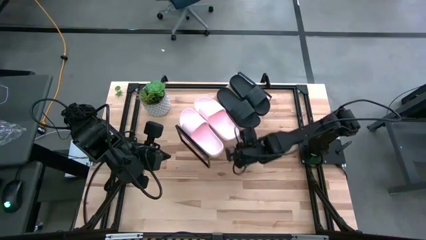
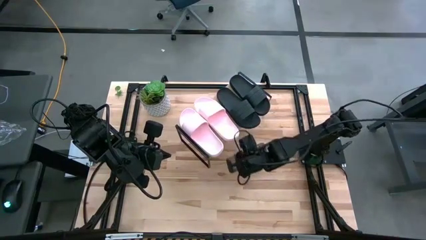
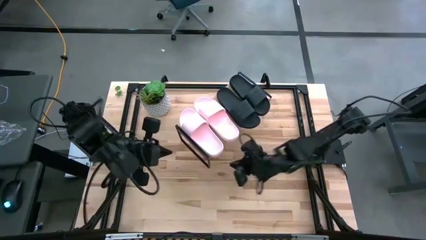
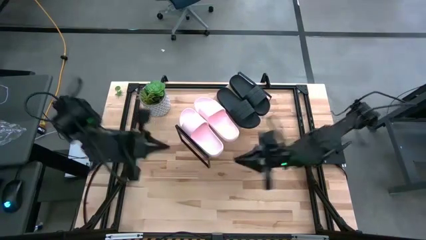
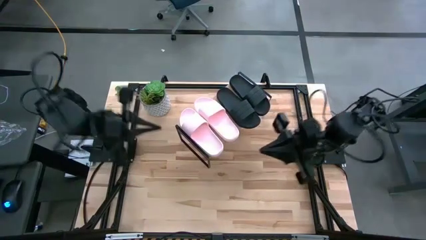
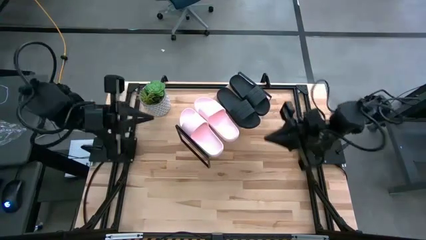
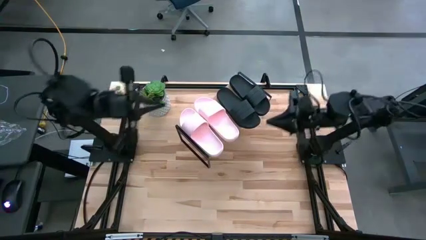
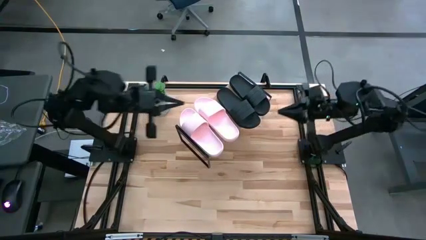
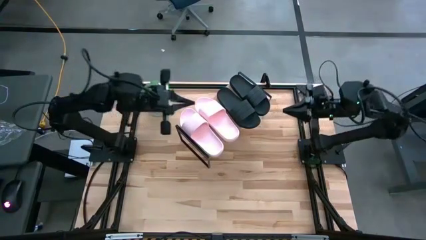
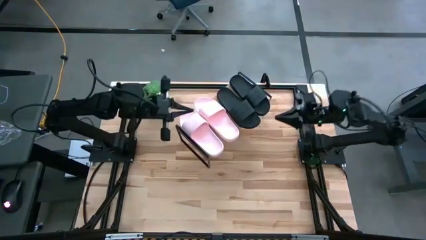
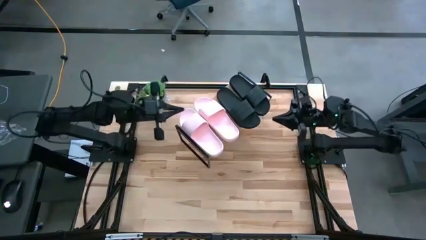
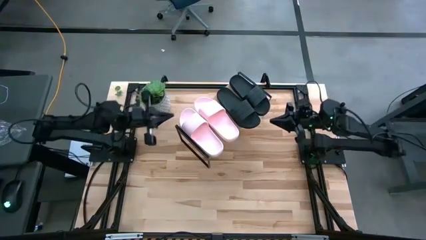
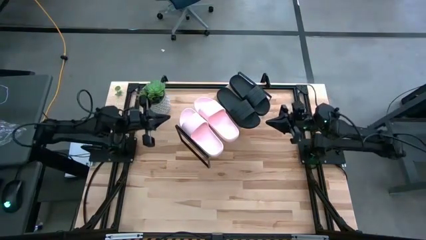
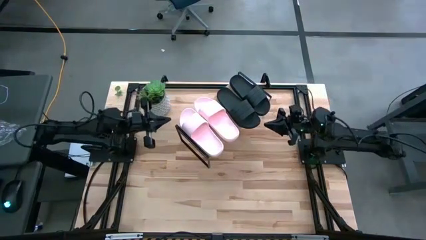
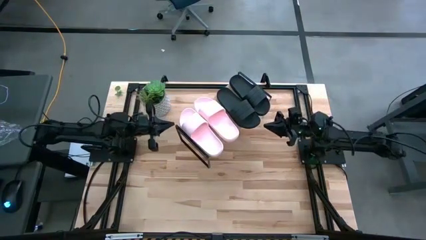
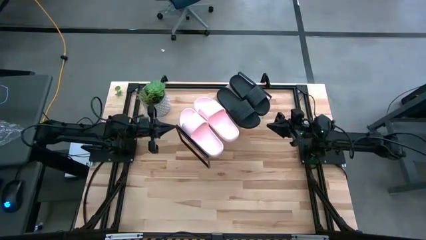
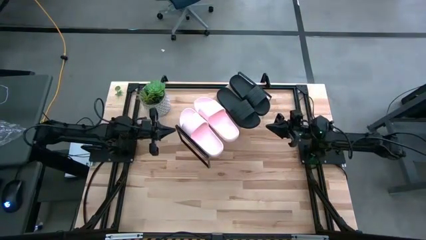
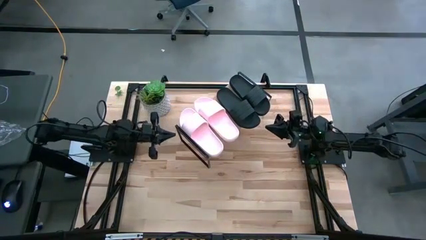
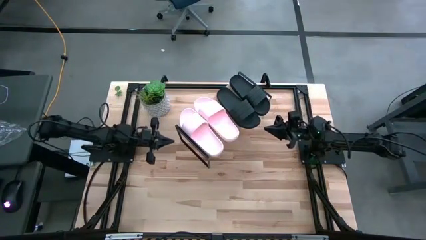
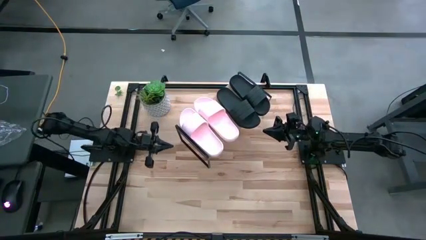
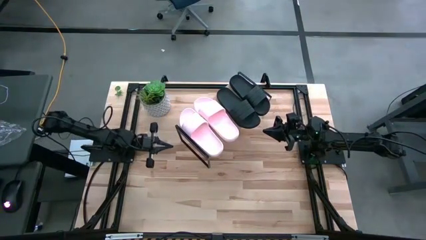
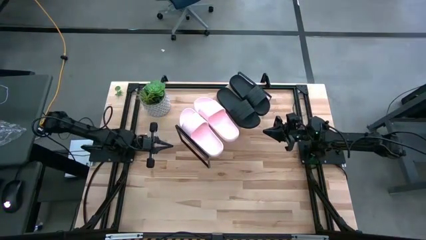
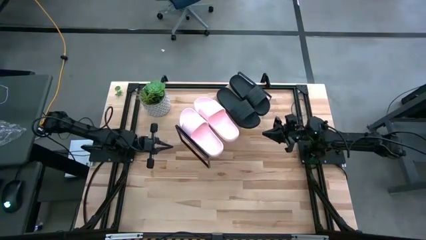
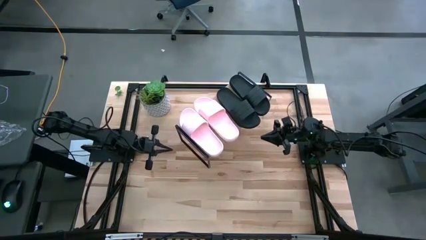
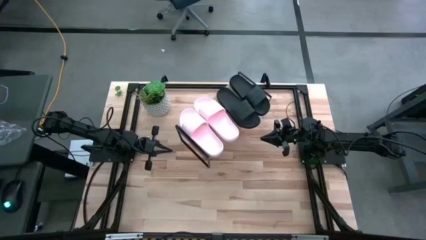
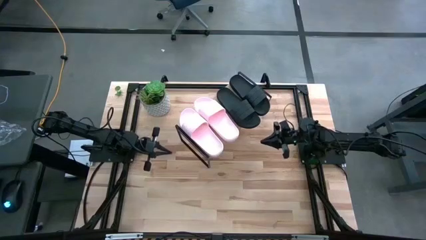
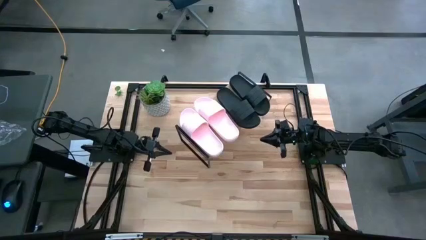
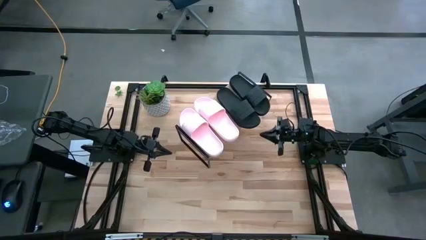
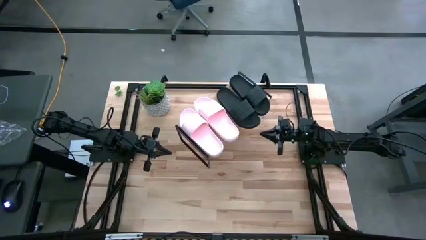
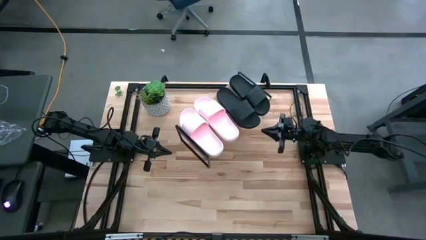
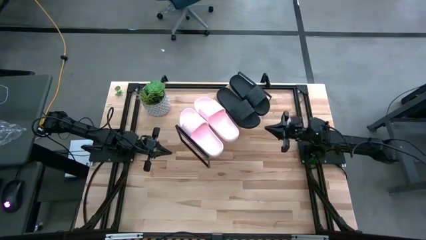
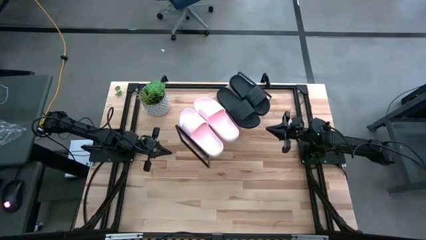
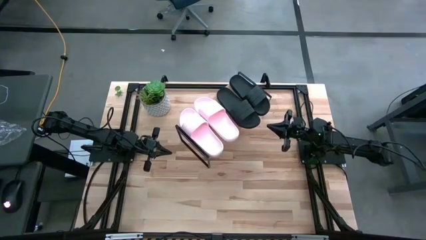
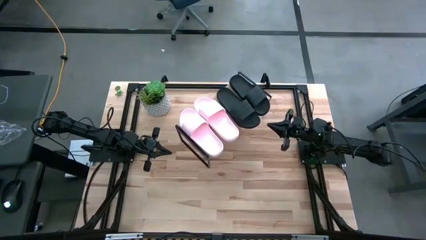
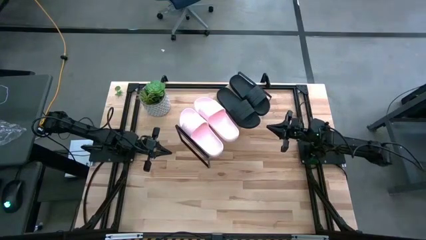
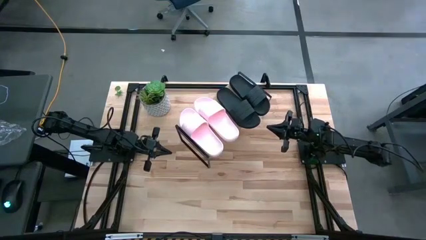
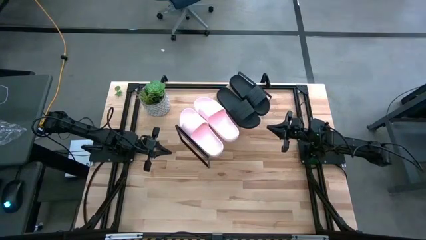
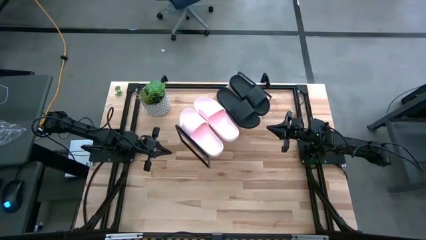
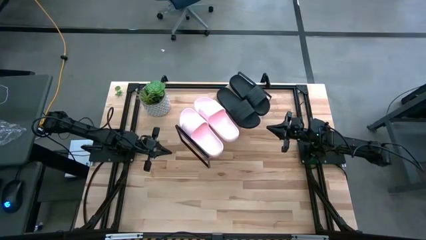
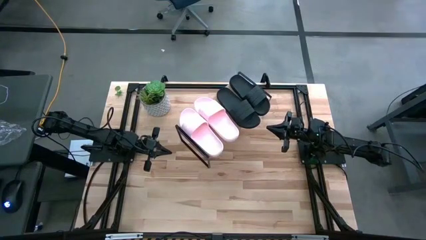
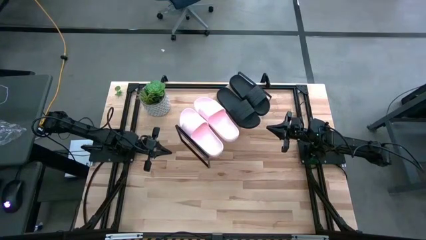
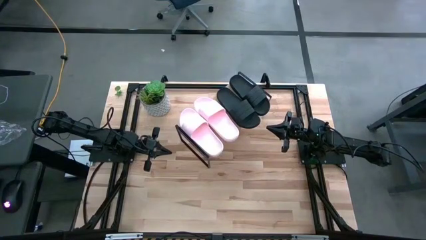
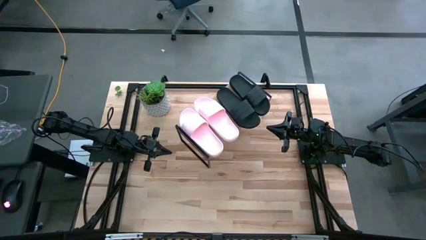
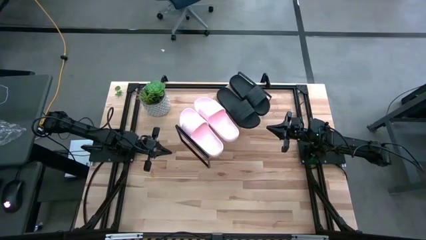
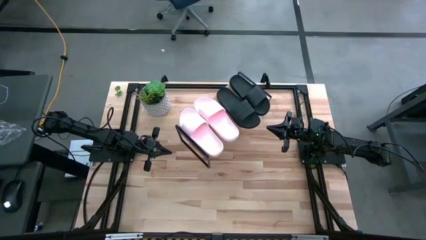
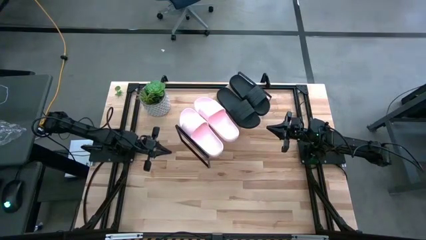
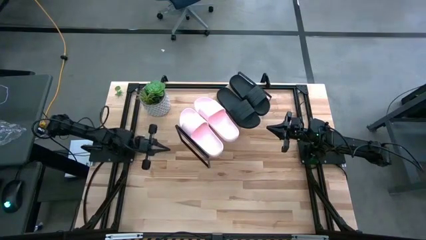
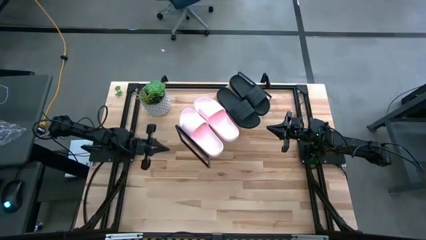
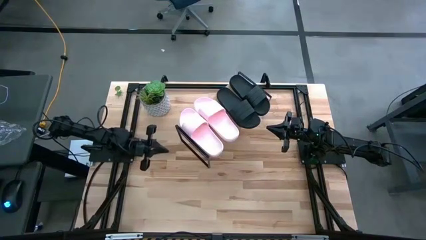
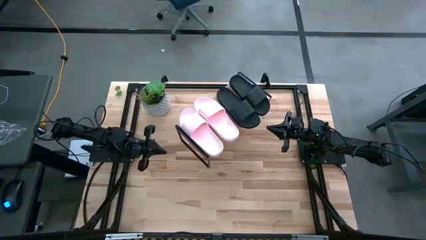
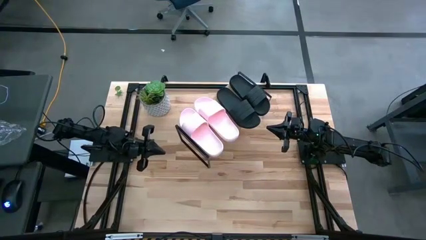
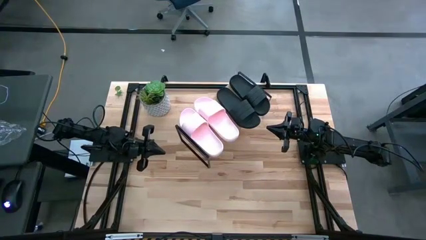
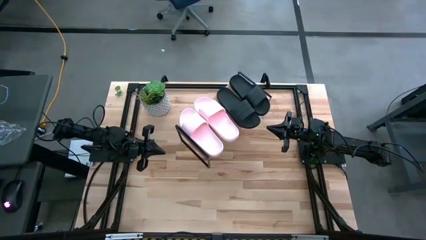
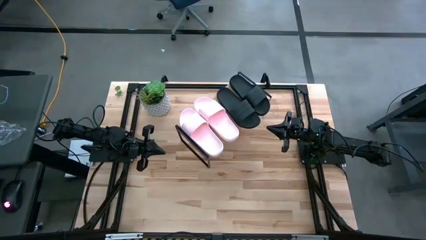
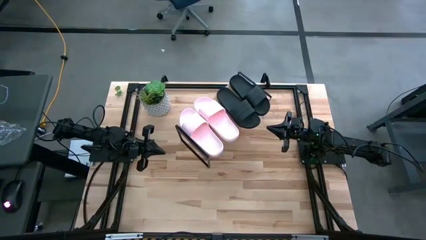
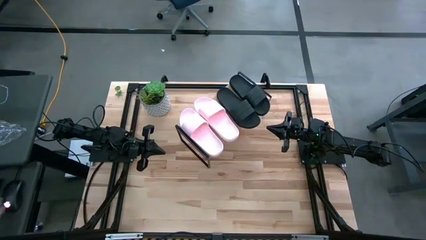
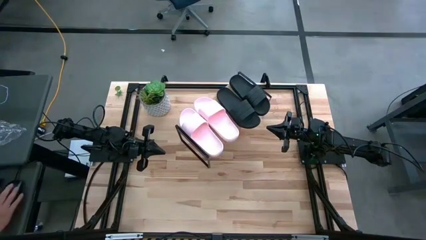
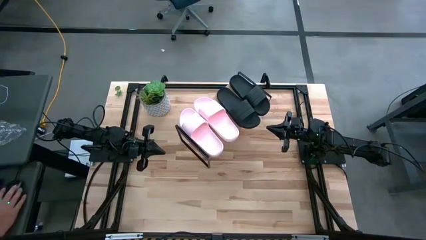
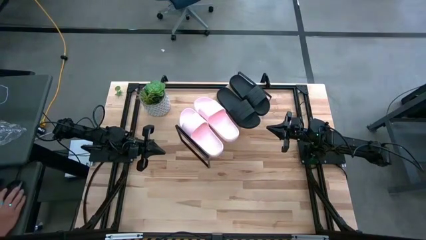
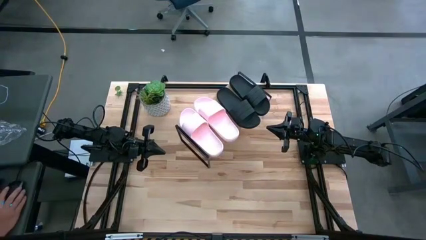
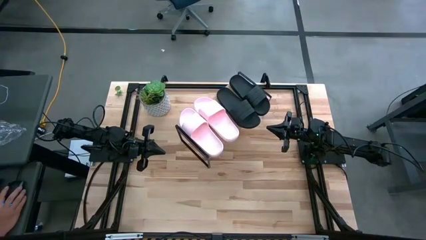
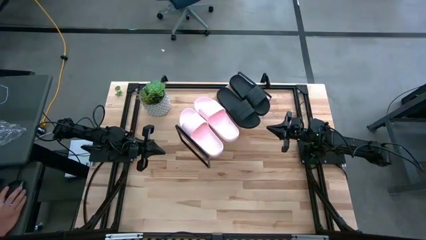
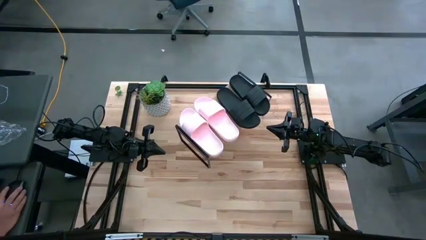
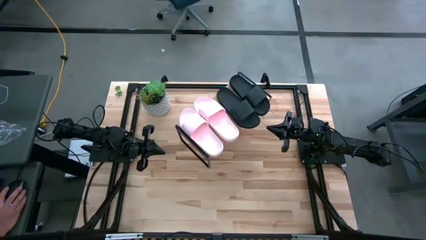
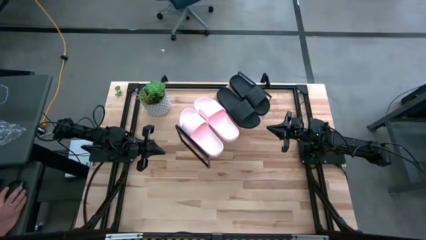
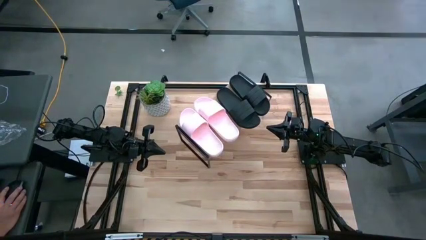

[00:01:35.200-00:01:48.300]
Task: Pick and place slides into the shelf
Return to Home Position

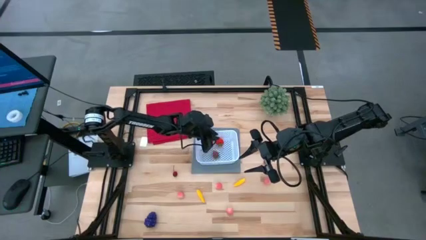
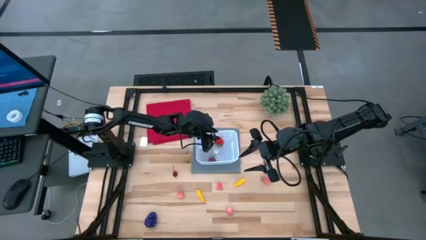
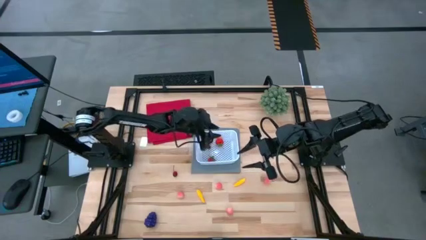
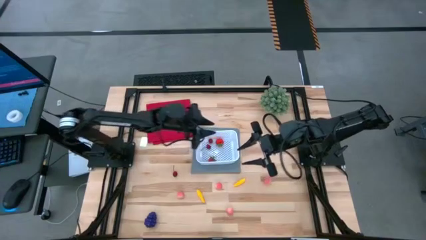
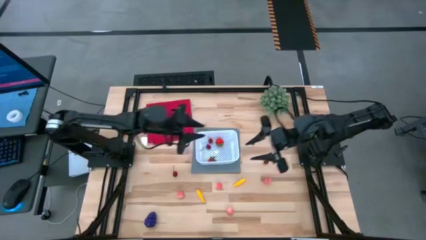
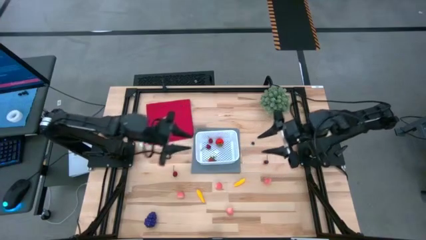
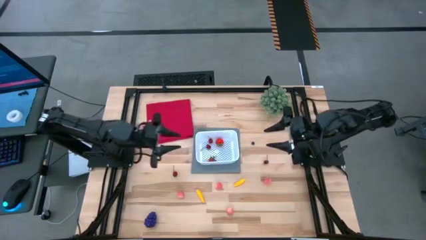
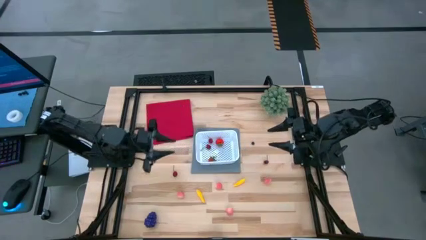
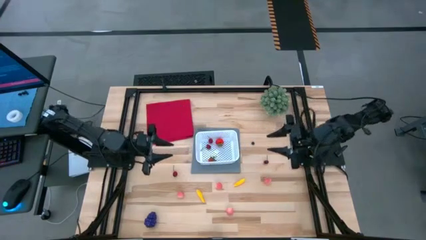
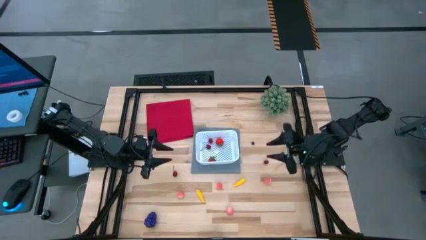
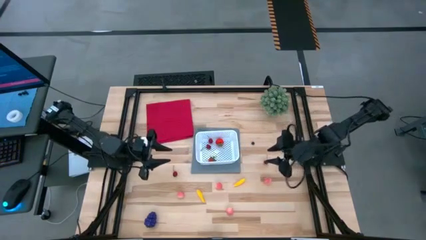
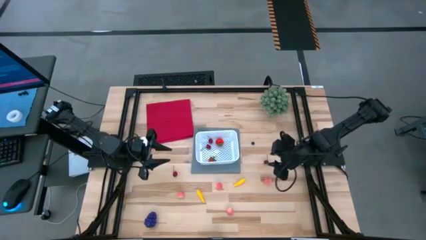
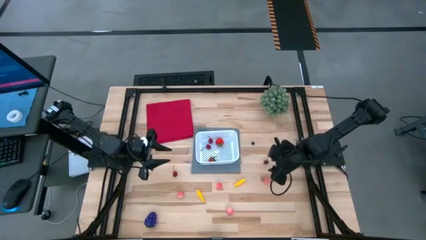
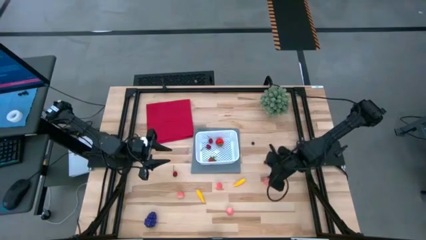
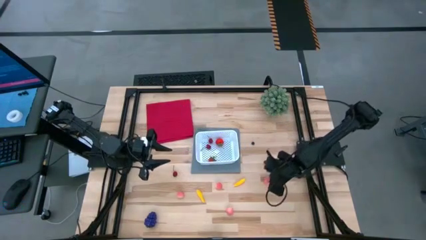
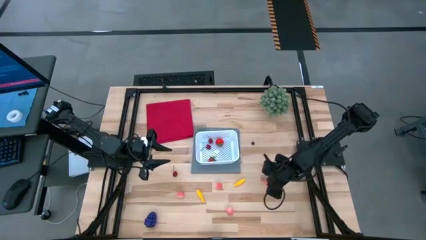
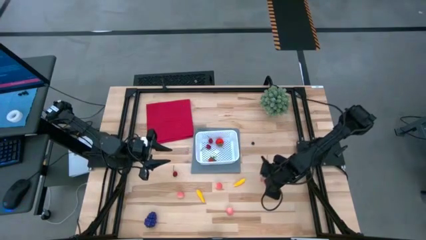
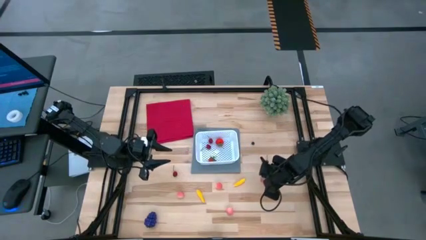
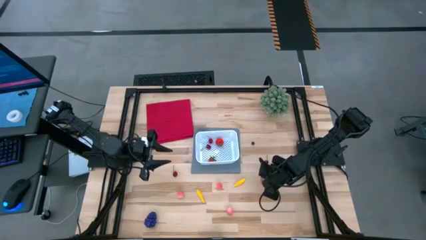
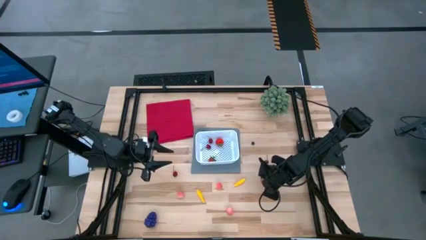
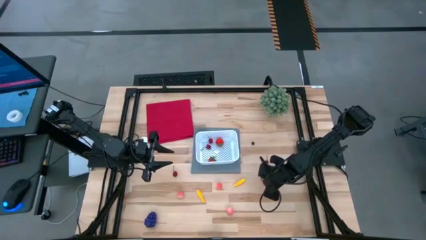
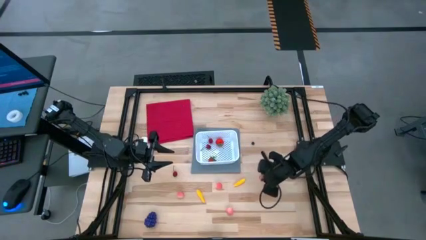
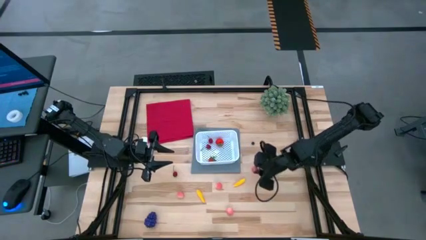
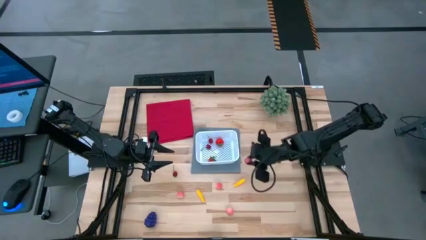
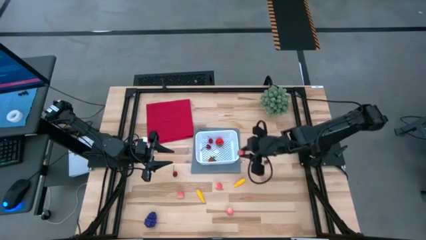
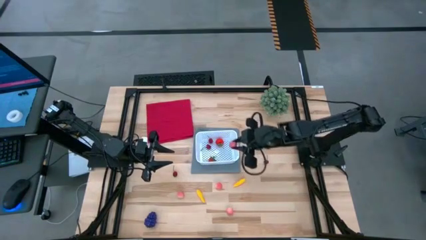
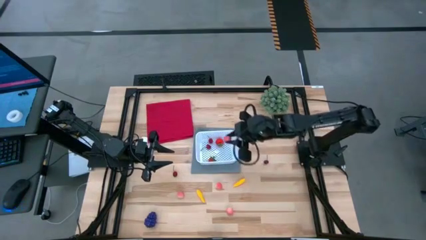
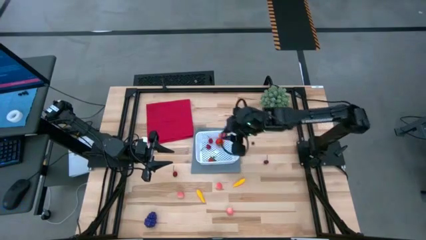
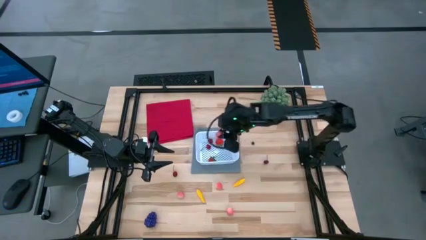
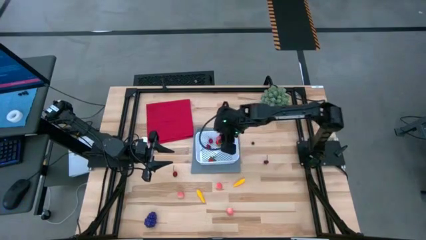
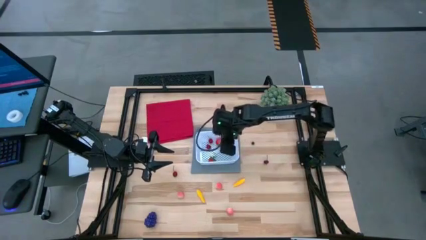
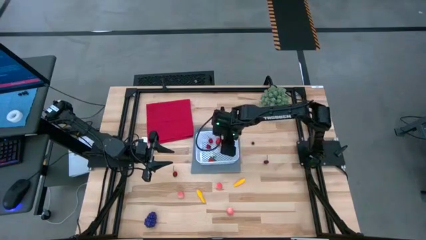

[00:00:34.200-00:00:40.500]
Task: Pick and placing Produce into tupperware
Put the top right peach into the white basket
